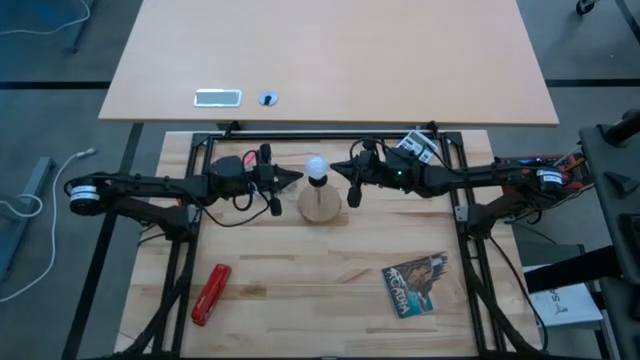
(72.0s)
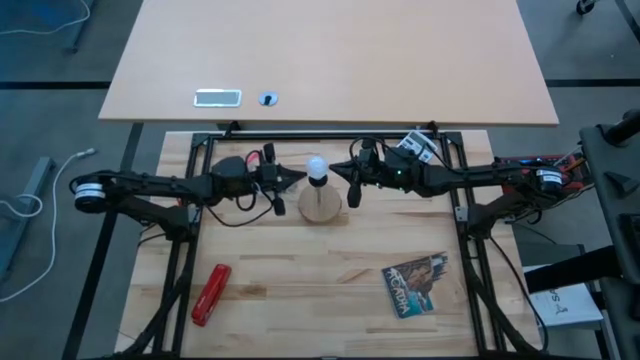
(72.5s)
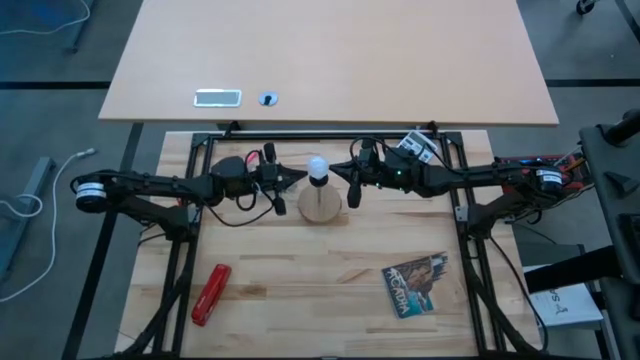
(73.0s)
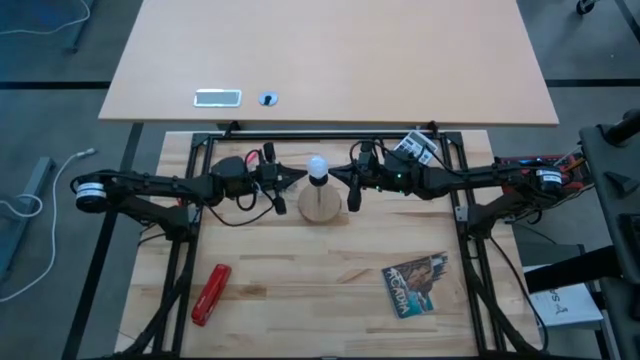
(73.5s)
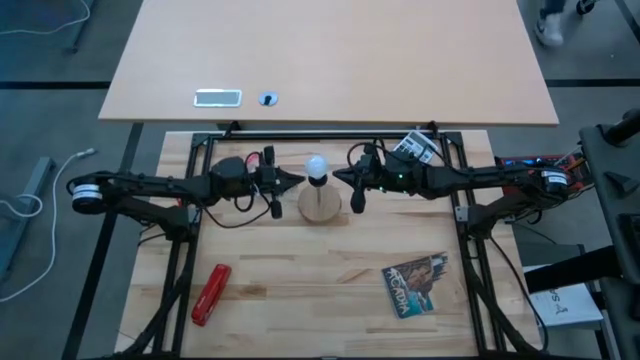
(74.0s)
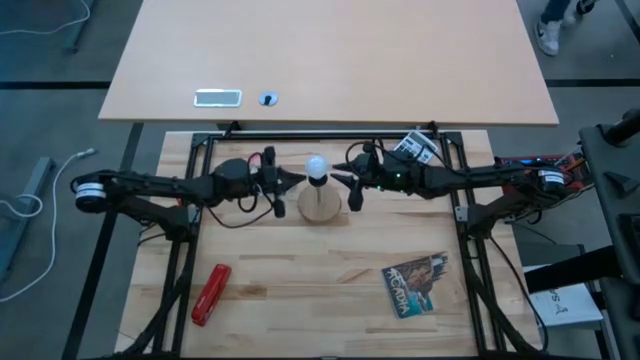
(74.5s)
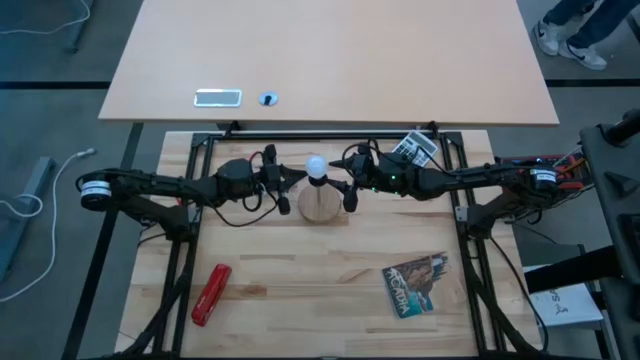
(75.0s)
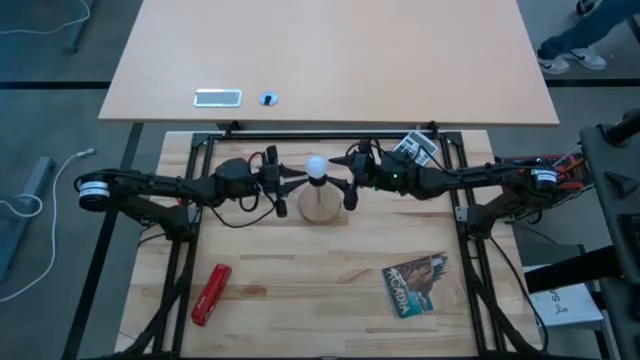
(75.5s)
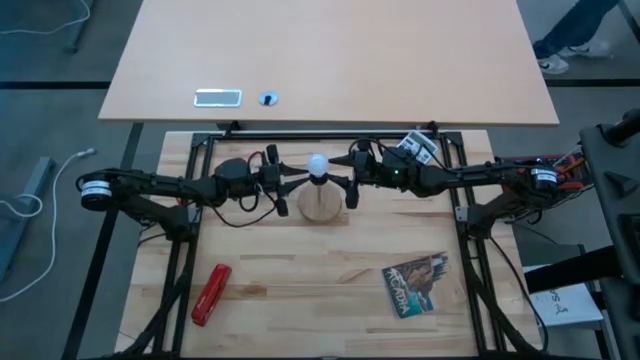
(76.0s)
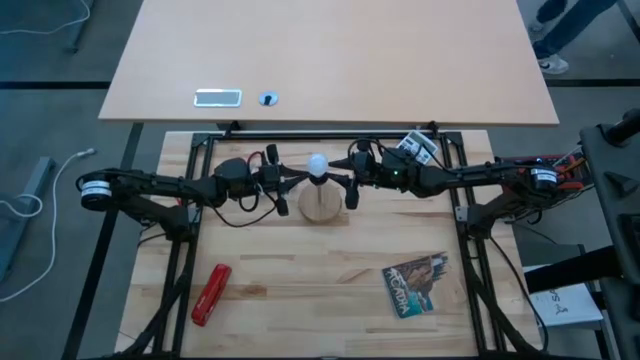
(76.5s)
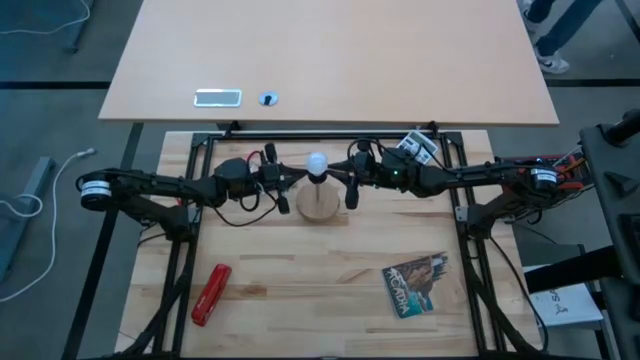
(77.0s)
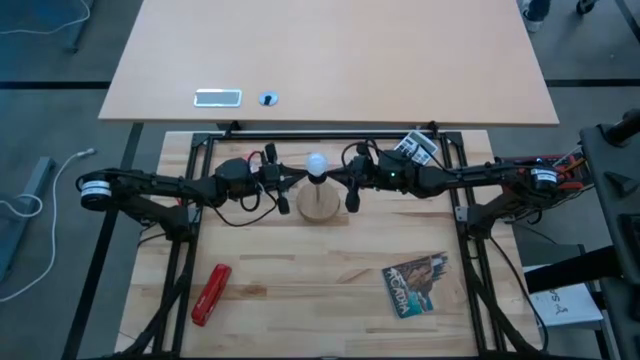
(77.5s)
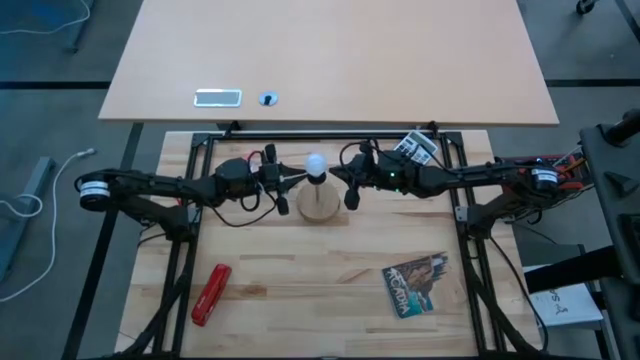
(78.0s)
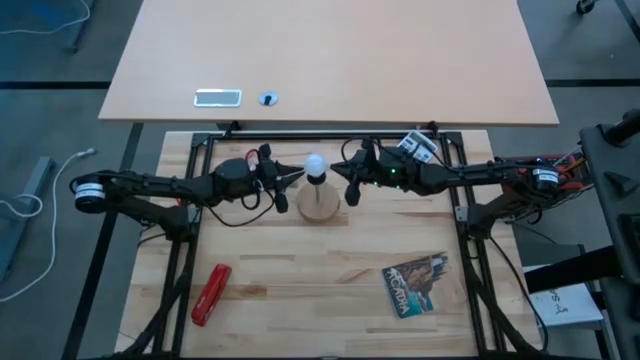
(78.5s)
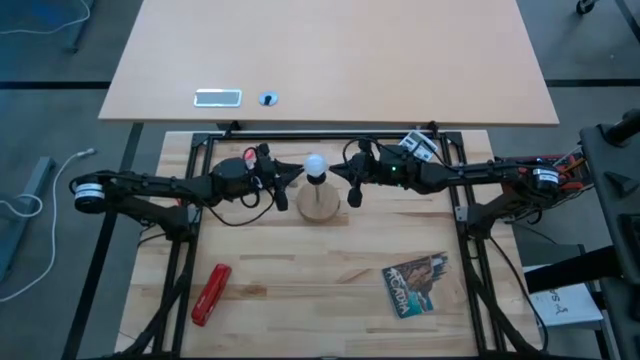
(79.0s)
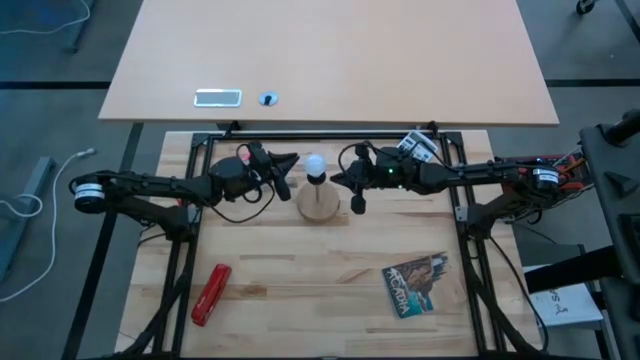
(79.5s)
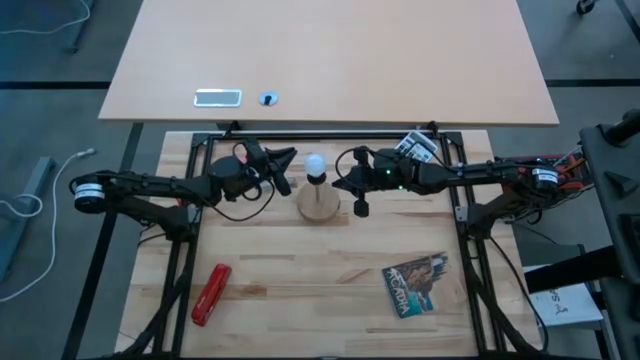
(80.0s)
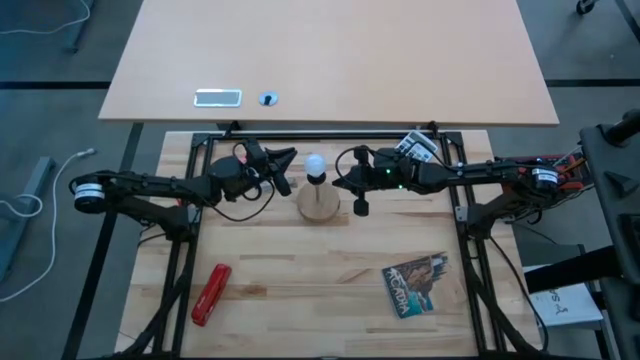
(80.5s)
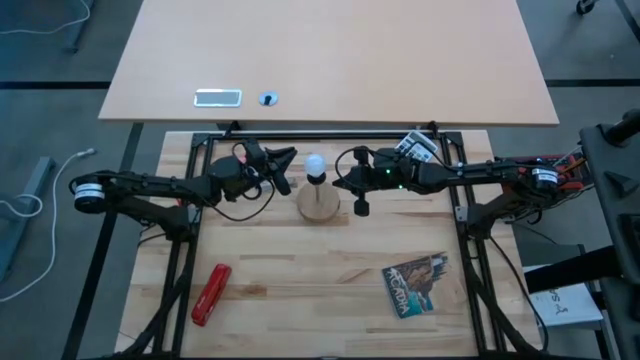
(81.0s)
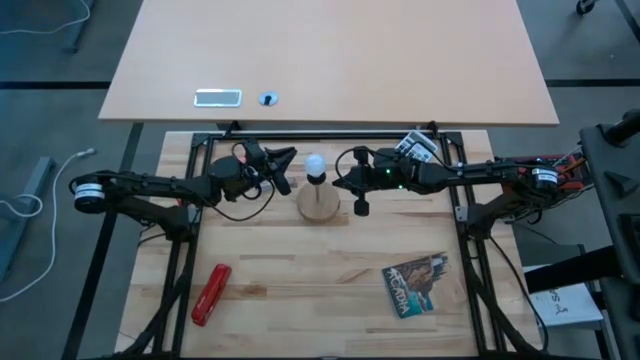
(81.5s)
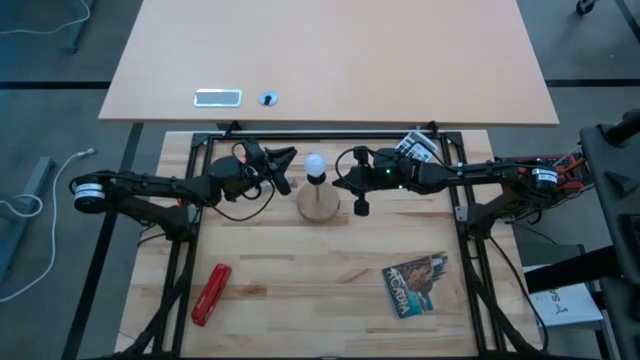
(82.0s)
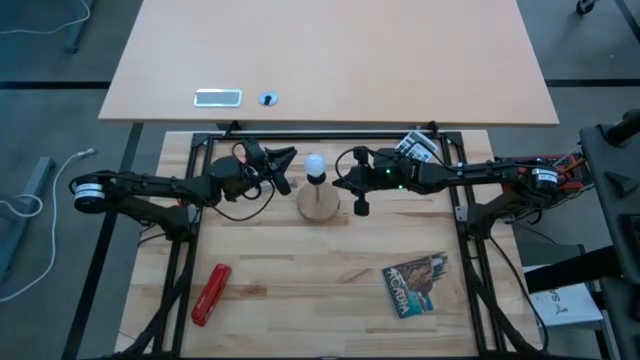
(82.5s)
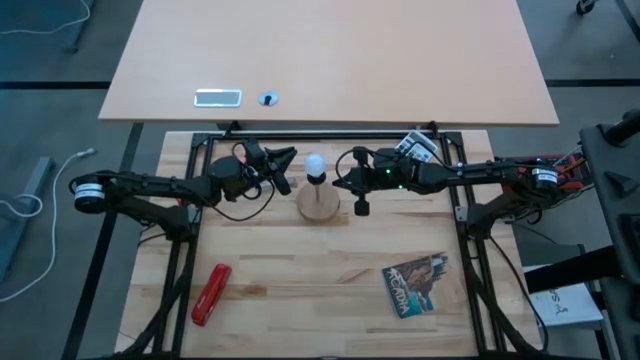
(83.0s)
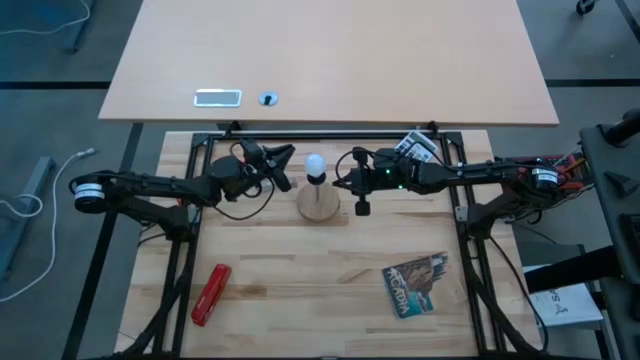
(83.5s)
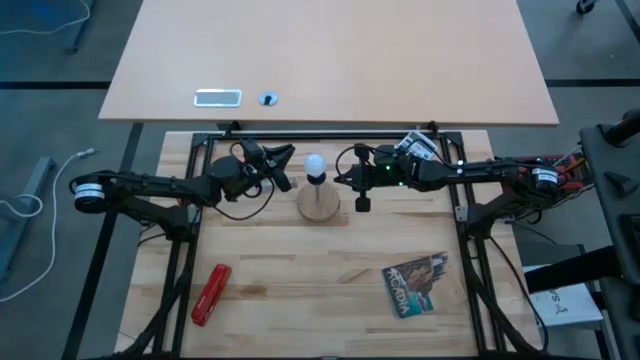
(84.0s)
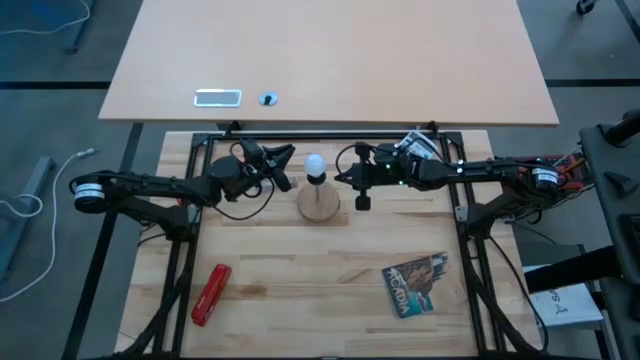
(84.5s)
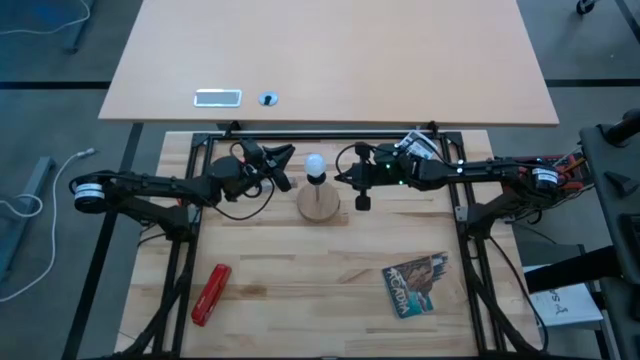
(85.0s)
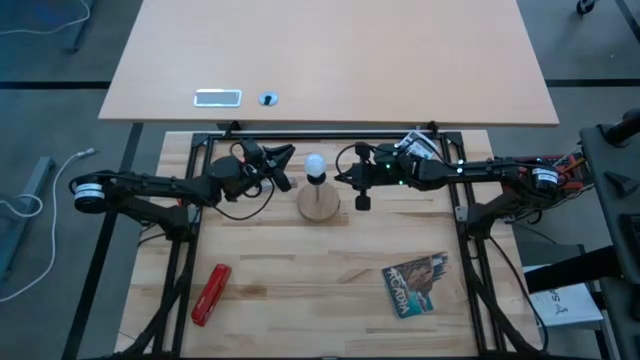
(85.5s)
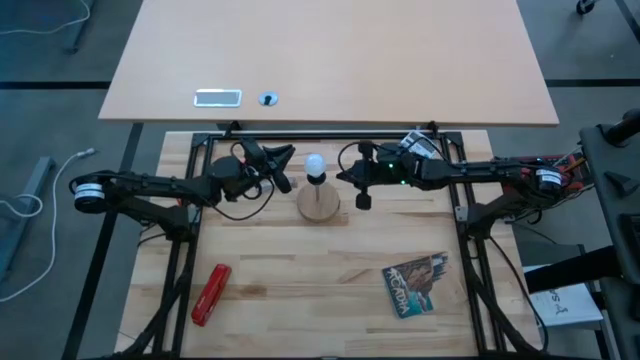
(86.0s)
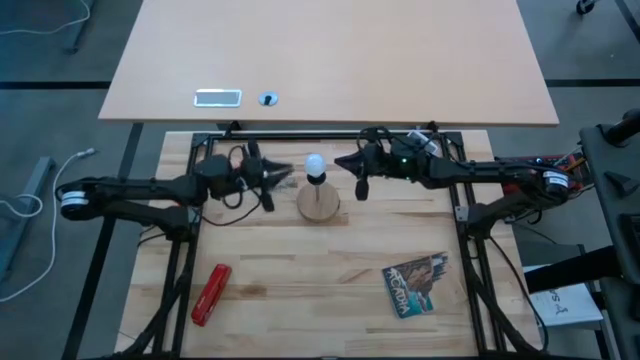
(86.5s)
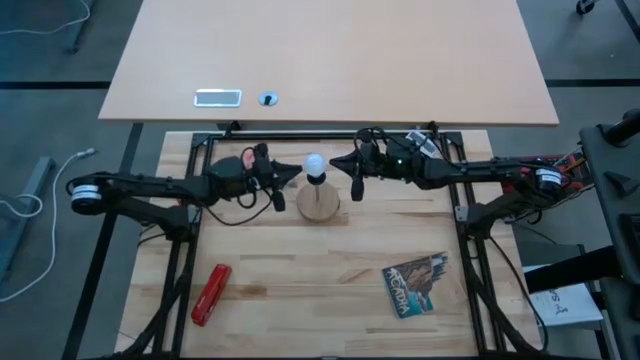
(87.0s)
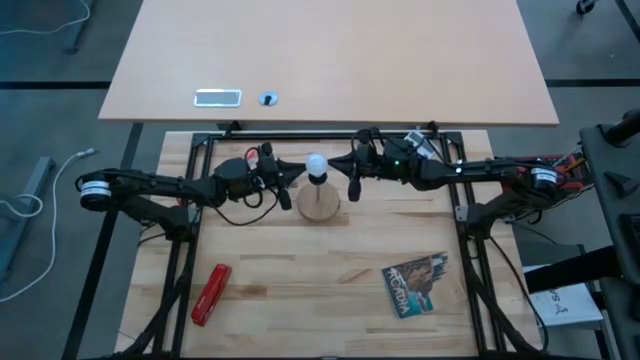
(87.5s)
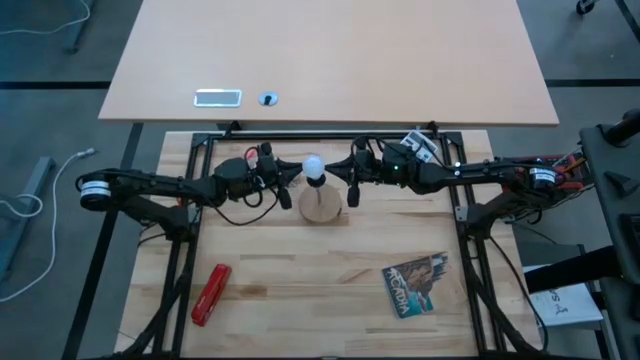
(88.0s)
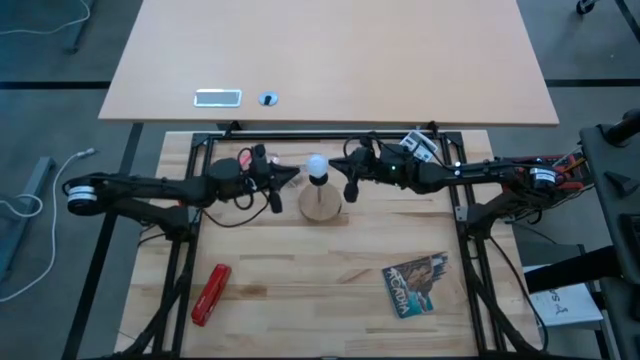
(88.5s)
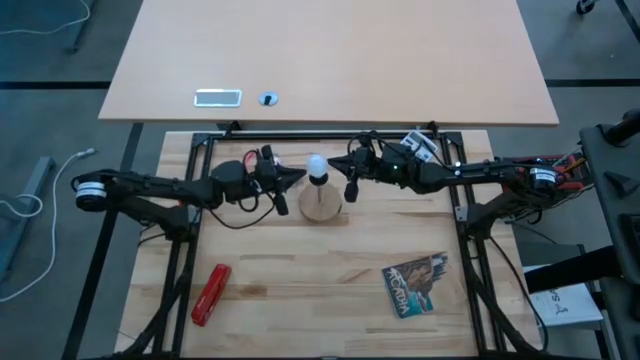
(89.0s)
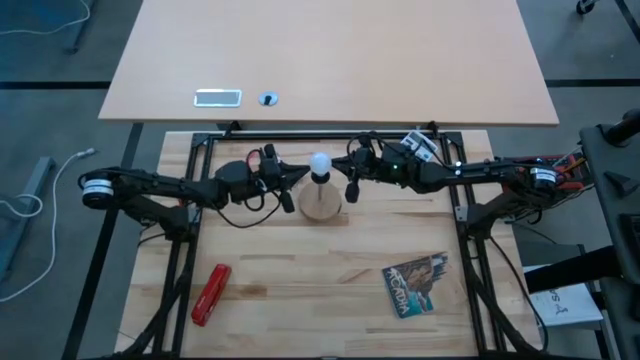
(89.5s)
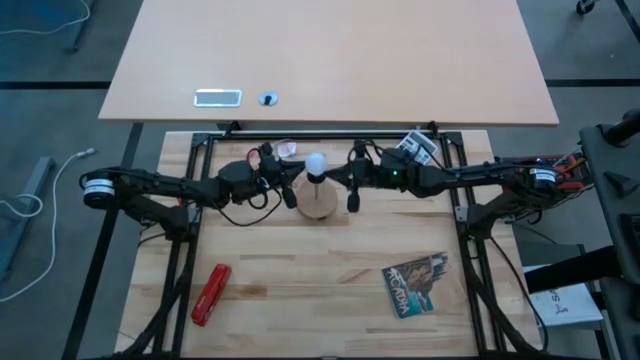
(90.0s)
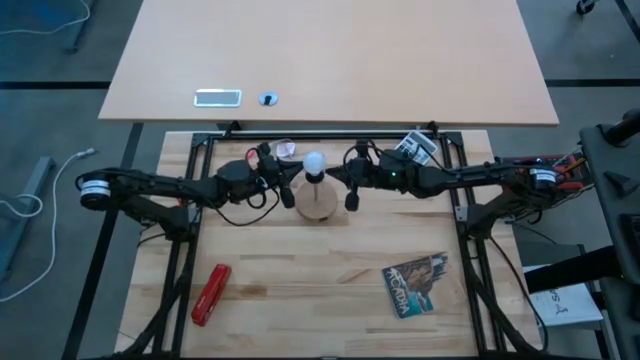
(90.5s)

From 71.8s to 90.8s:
Task: Screw lightbulb
Insert the lightbulb into the lamp
